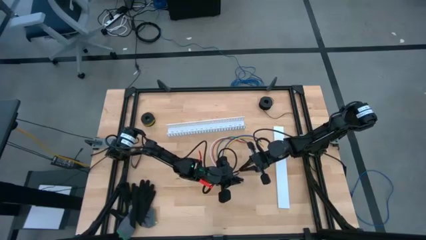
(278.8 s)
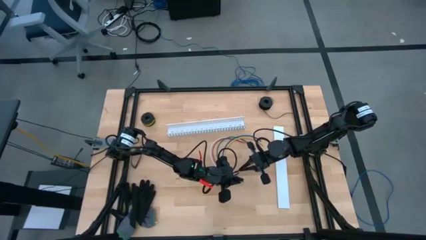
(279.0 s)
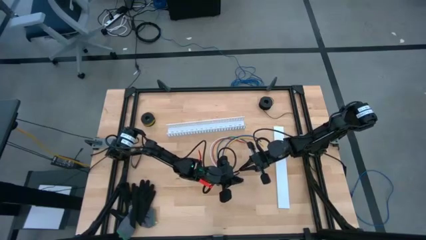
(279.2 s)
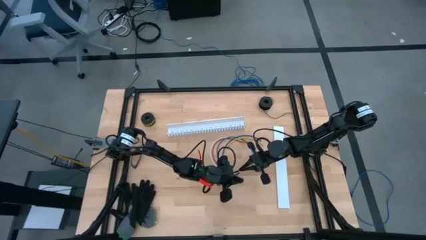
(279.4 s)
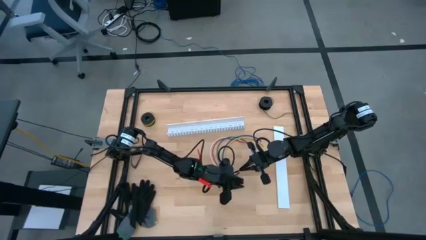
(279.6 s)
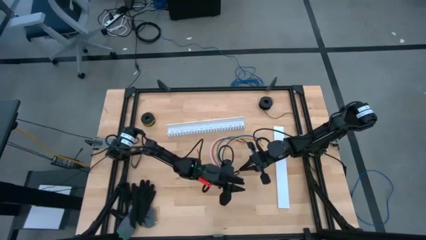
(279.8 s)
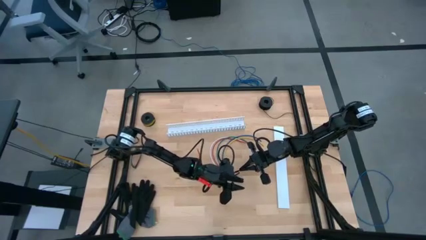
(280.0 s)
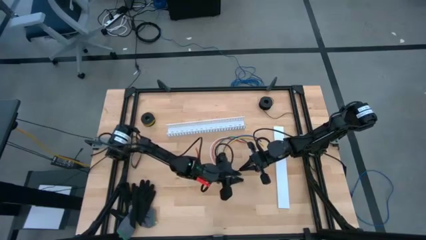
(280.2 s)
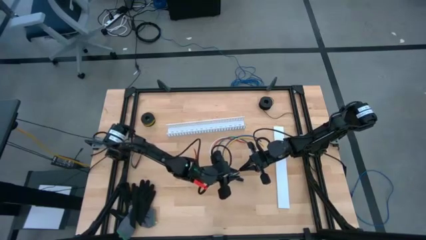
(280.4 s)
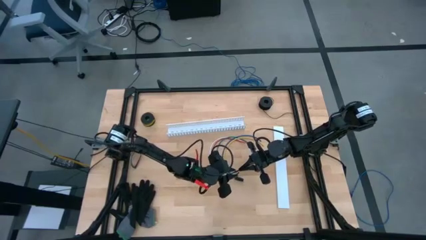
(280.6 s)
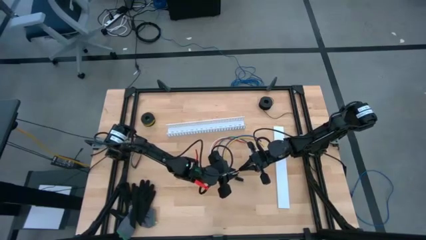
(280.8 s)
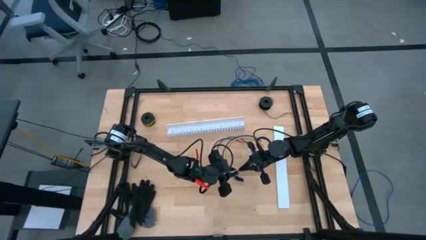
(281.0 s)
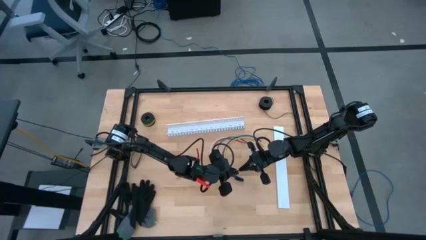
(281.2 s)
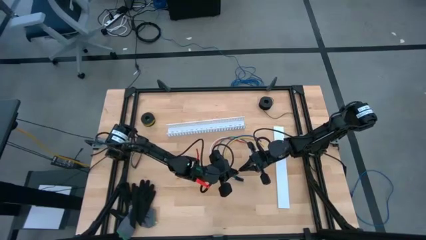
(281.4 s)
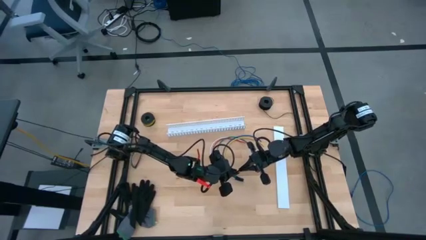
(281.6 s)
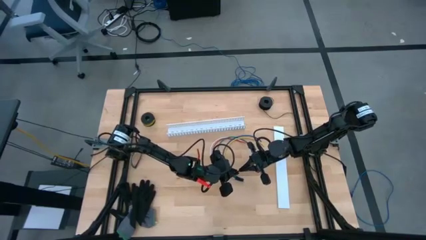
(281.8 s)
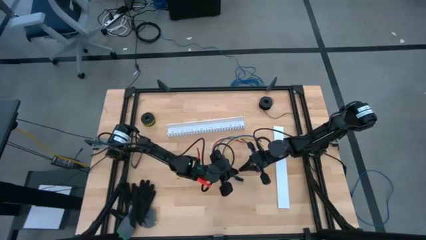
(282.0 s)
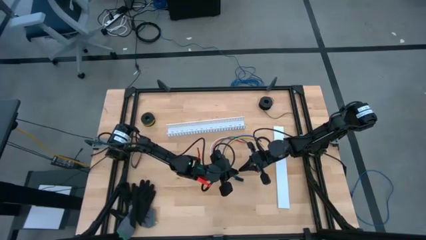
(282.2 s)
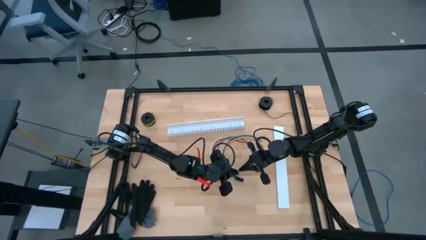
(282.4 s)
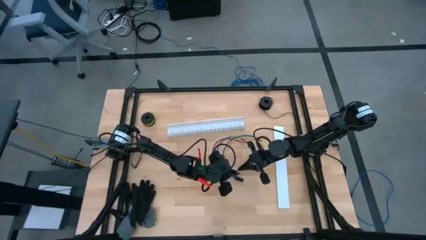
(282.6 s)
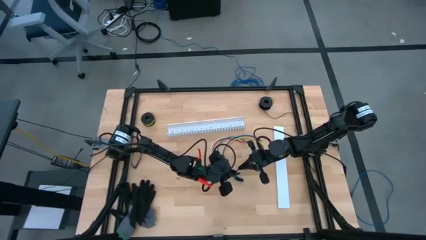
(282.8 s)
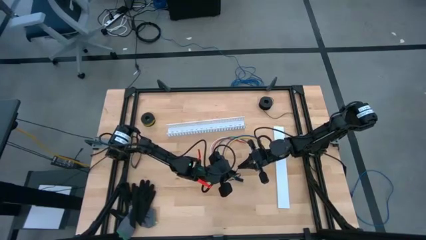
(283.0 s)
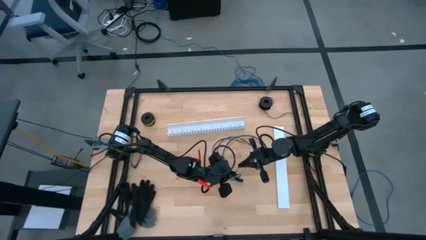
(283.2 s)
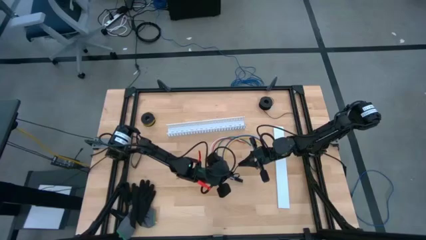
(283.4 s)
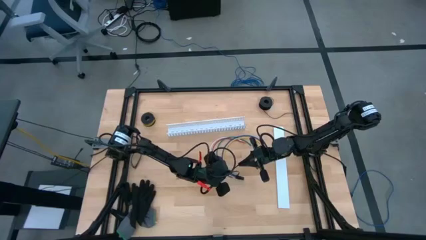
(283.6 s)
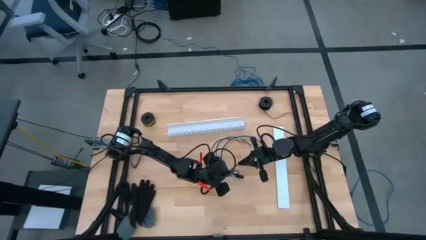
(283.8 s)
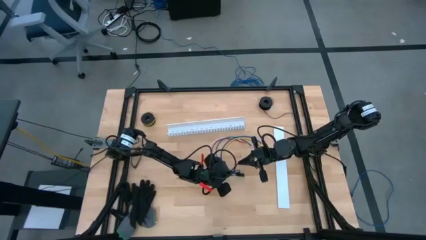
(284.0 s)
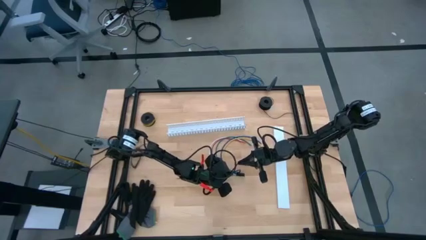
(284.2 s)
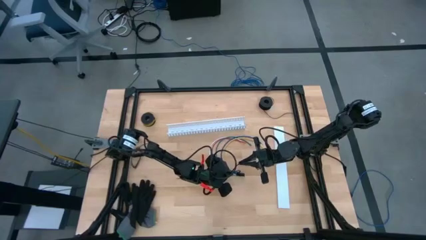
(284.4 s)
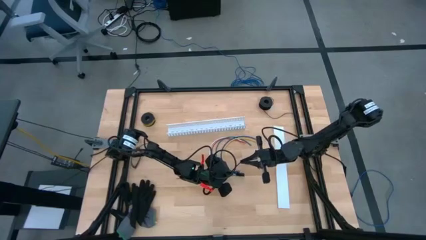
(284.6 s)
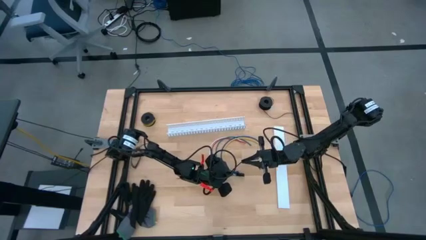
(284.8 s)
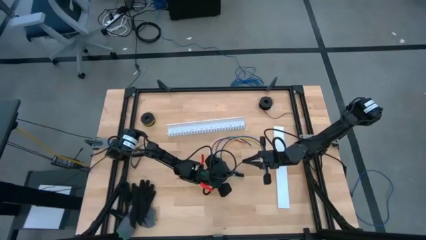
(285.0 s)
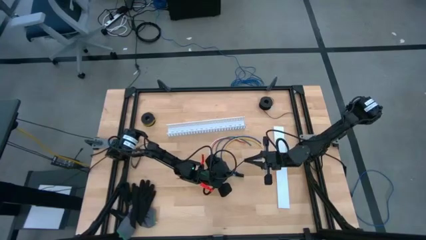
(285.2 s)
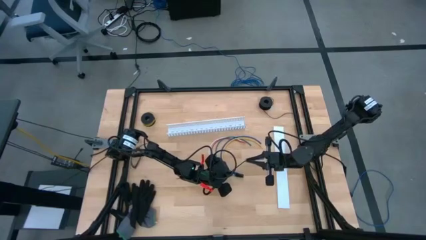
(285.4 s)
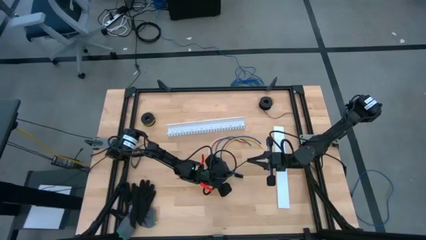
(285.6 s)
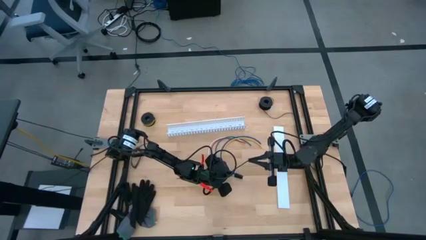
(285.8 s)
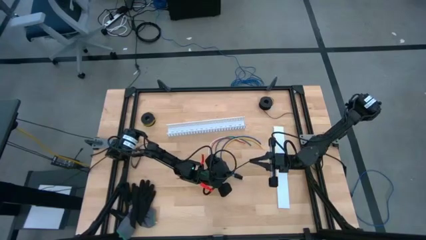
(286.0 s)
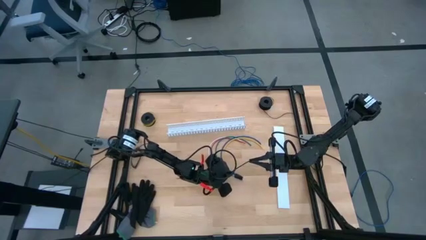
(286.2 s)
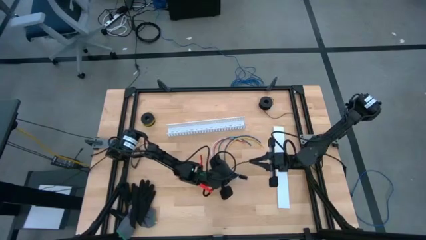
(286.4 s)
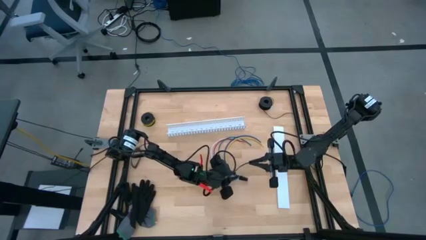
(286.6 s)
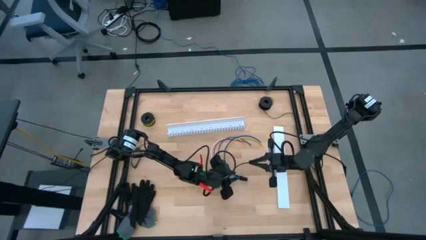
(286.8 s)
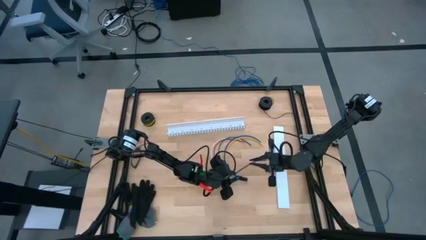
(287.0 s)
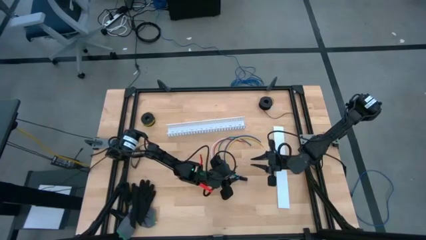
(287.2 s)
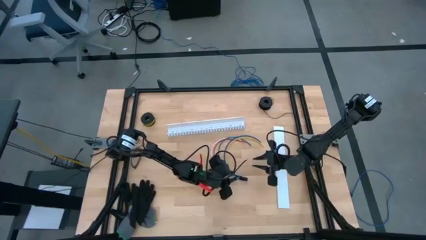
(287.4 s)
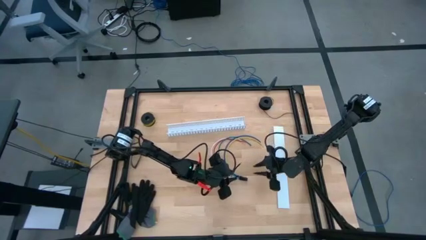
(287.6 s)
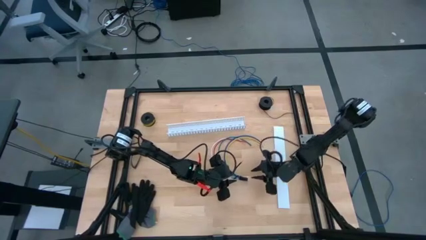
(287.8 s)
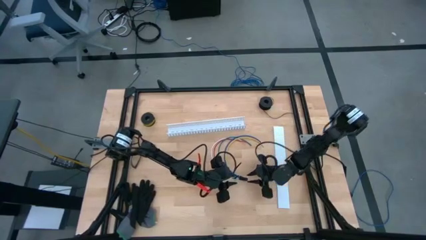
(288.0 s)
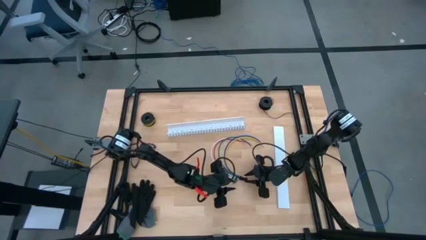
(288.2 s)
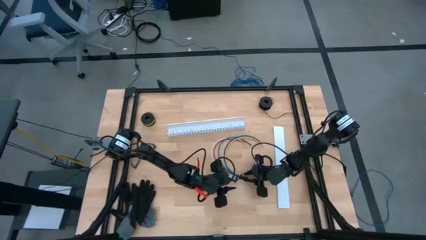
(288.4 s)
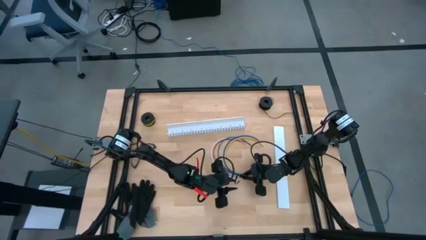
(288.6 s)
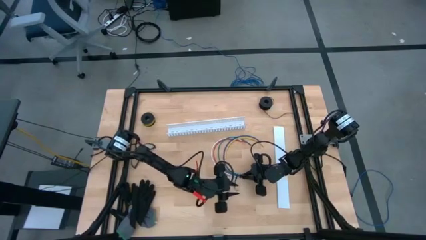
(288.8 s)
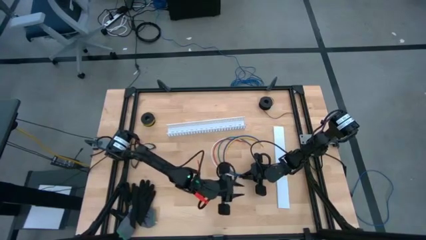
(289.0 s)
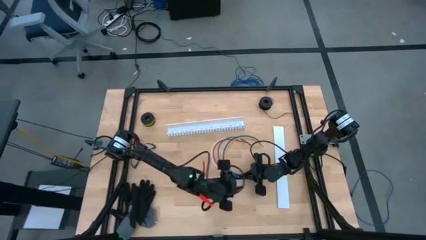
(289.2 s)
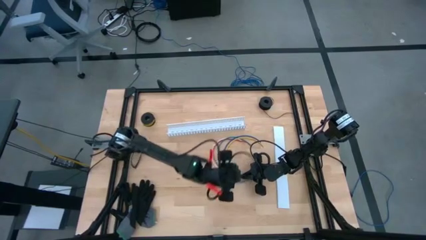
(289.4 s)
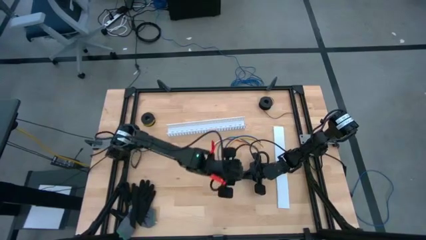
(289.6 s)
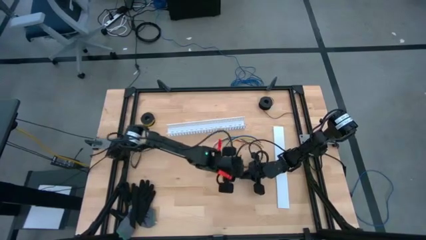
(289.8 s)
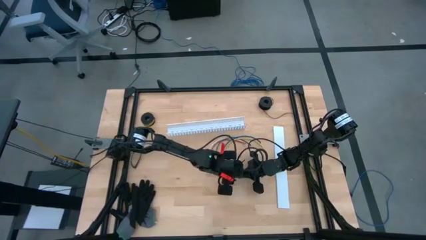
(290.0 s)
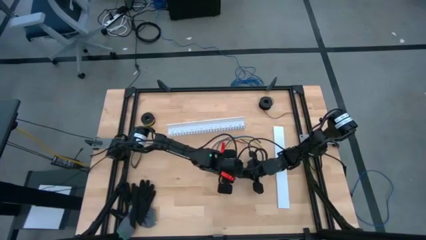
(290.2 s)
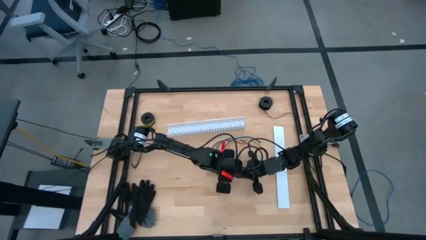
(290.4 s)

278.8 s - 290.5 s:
Task: Ziptie cables
Insert black zip tie on the cable wire
